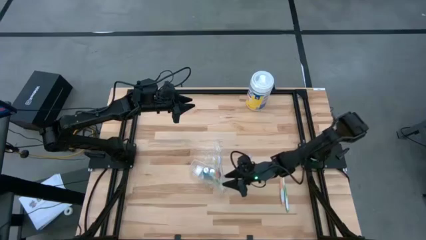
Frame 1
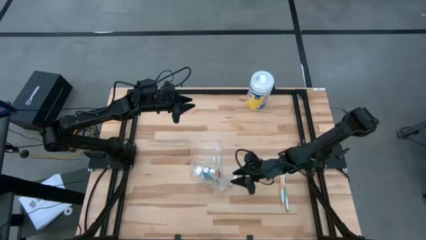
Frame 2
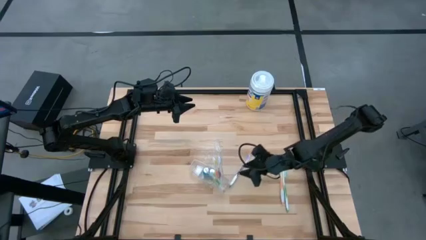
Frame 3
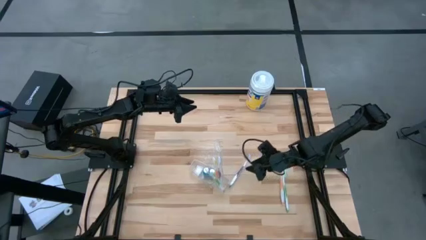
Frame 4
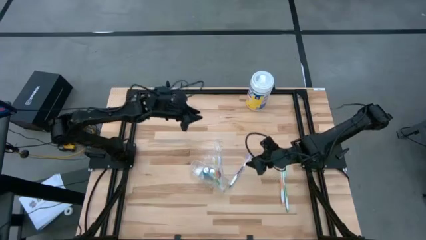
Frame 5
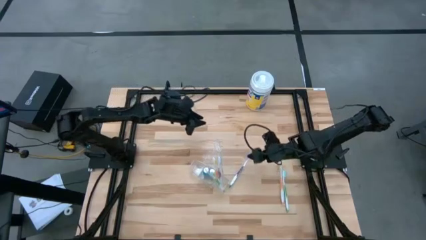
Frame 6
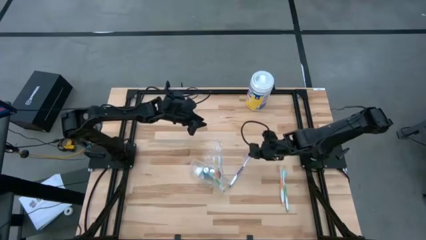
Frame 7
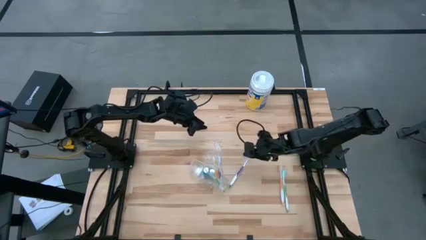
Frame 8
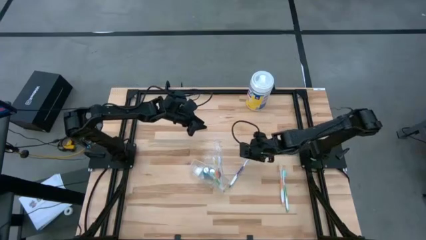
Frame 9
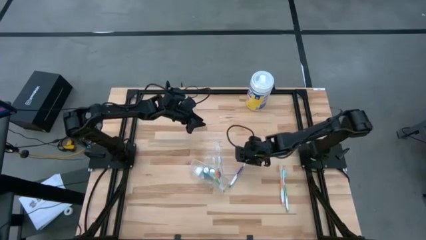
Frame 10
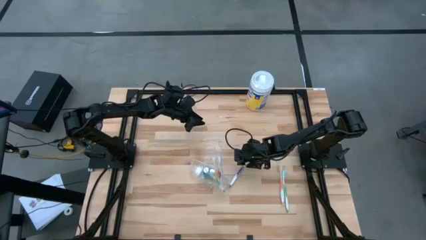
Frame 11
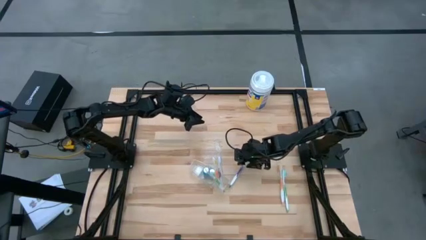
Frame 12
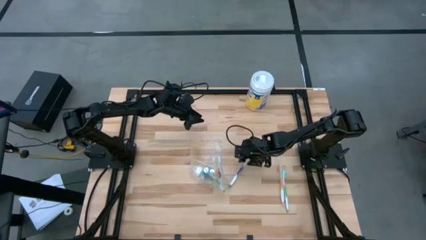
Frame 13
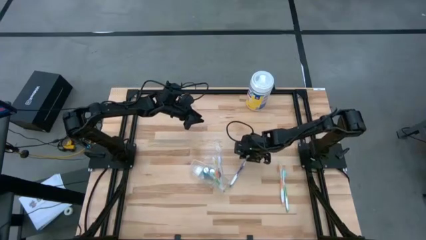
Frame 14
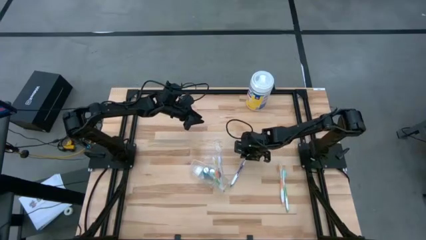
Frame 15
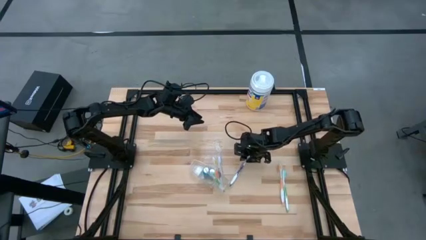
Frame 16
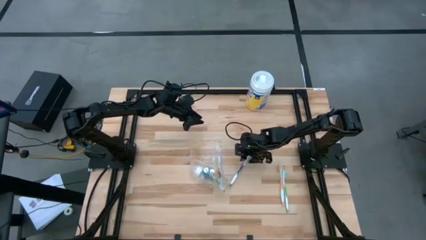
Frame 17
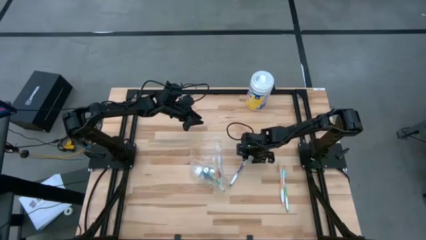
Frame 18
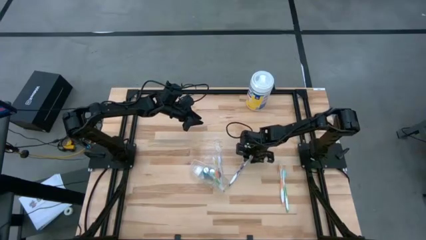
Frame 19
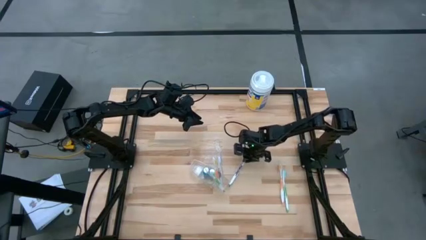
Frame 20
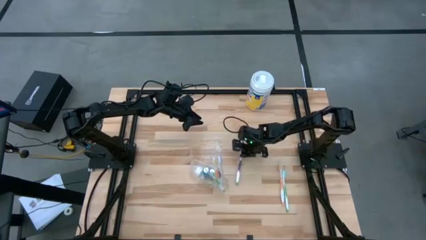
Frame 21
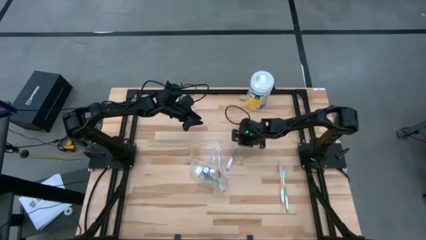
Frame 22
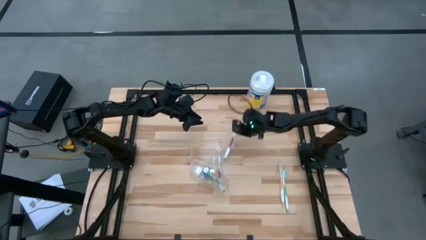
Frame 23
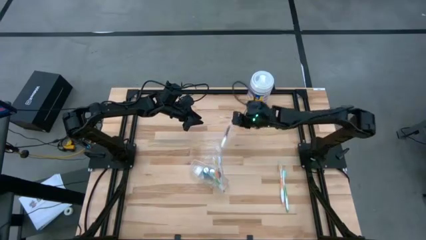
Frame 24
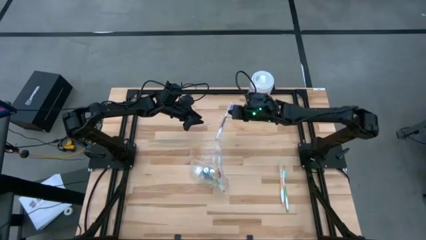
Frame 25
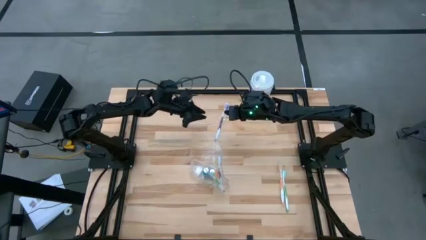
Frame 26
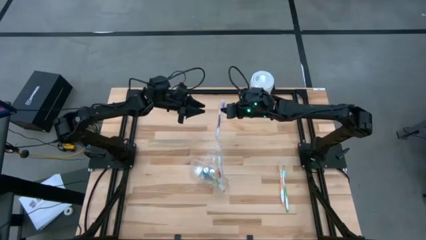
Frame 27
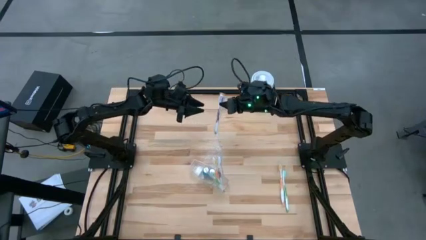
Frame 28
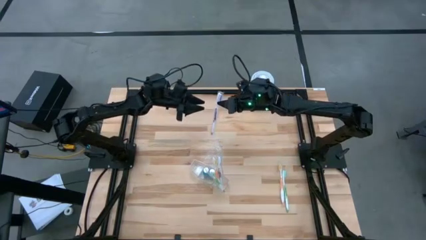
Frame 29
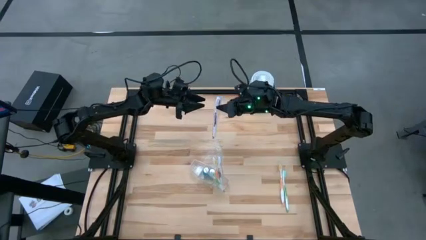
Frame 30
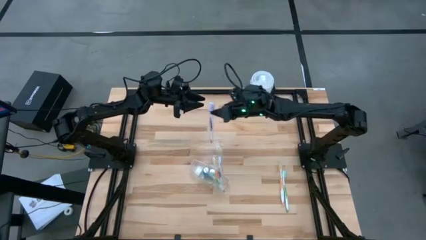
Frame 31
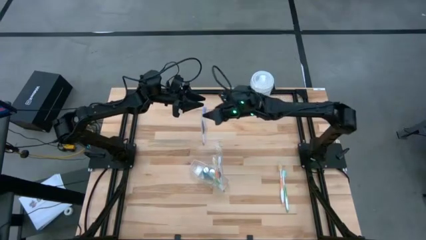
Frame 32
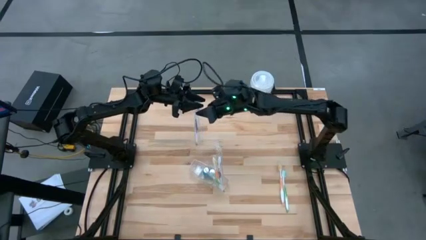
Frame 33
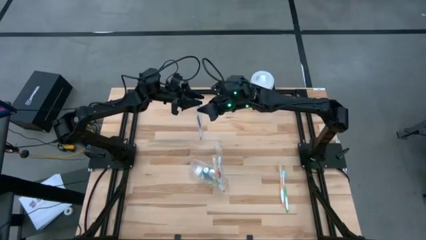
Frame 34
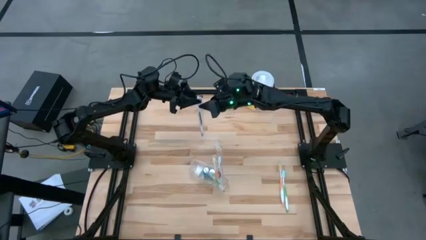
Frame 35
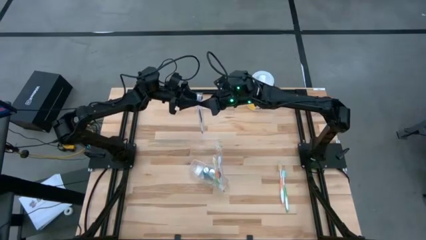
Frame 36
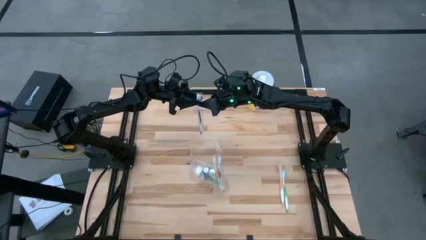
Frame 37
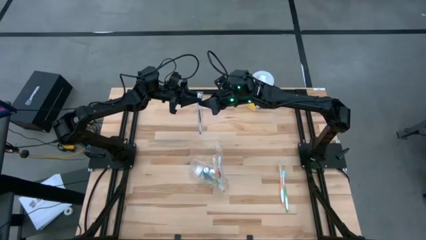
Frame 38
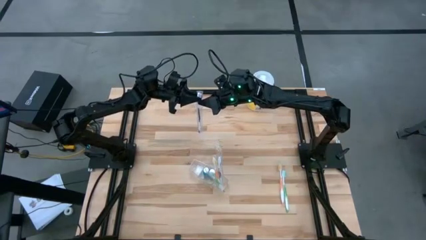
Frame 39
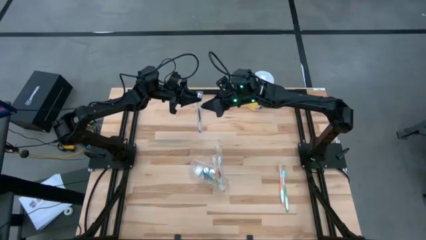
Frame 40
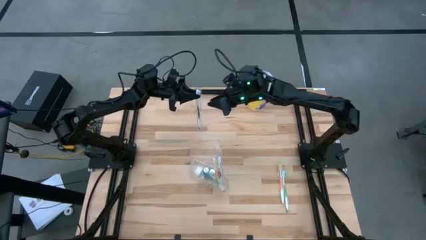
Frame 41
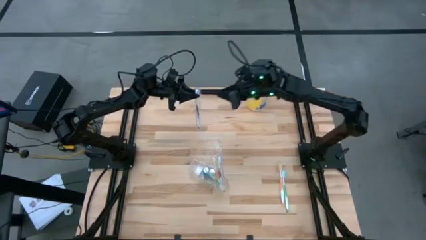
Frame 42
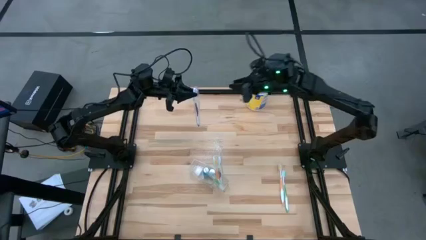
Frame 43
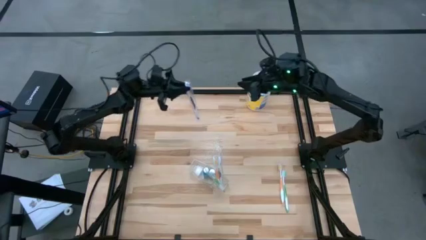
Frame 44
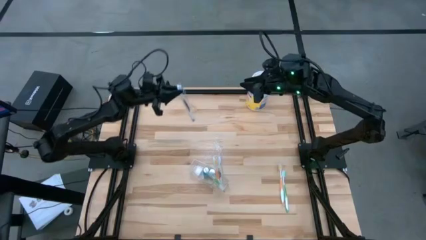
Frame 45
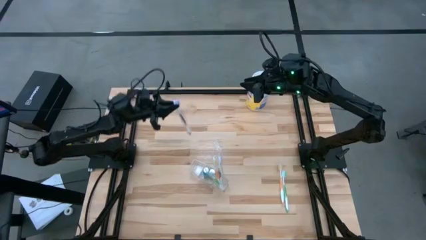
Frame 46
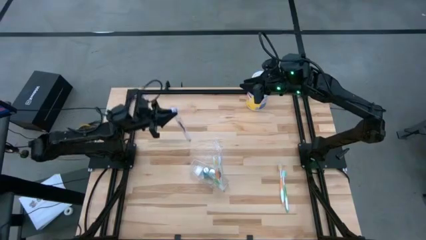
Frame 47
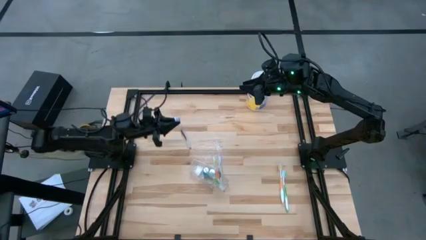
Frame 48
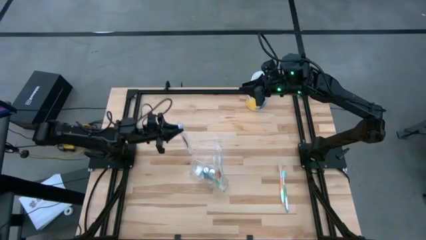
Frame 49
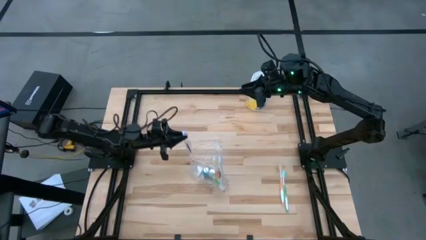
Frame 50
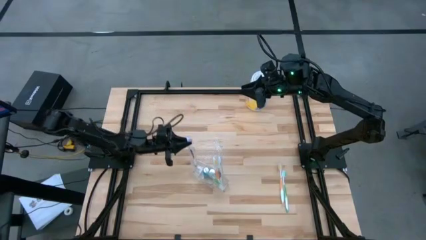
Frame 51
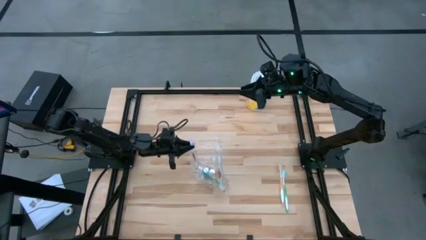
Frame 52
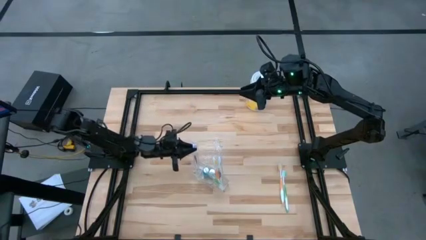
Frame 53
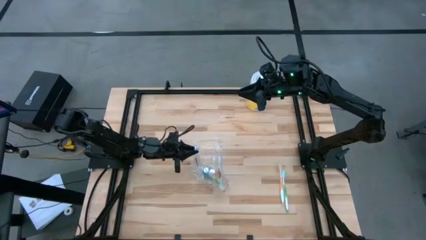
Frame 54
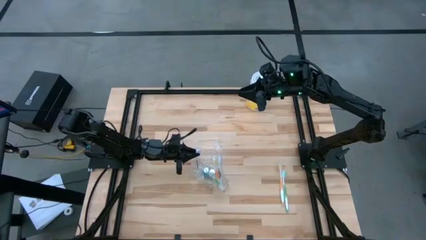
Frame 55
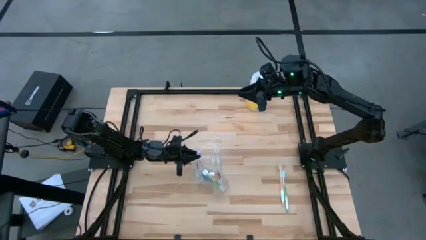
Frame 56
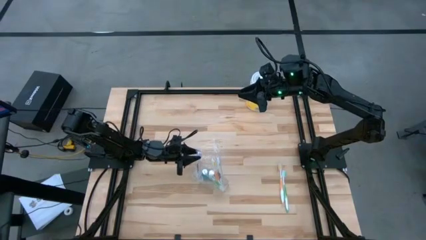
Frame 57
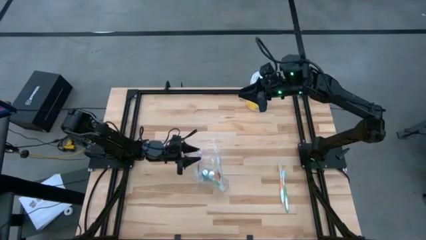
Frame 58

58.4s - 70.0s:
Task: Pick & Place toothbrushing station
Put the purple toothbrush into the transparent organizer
